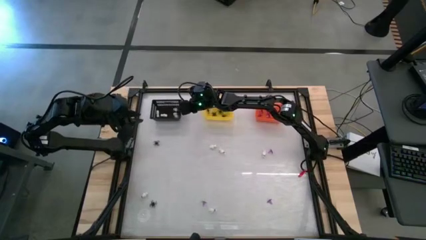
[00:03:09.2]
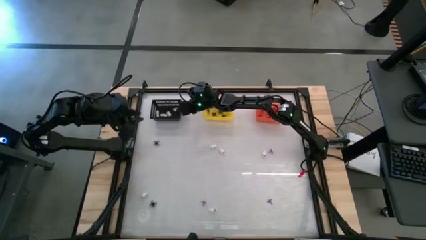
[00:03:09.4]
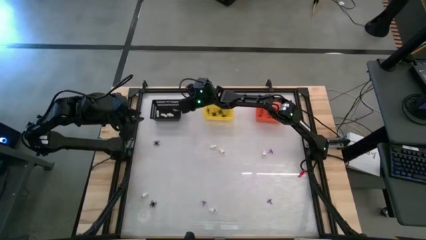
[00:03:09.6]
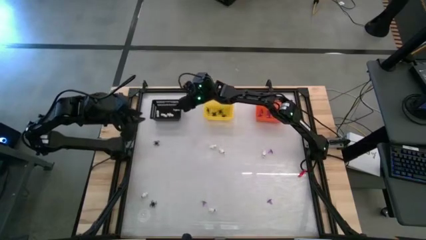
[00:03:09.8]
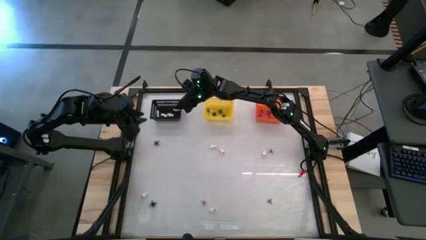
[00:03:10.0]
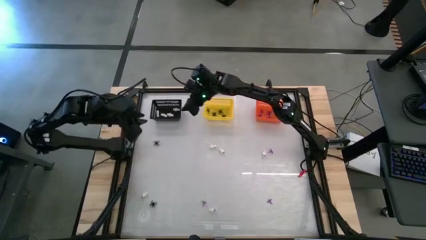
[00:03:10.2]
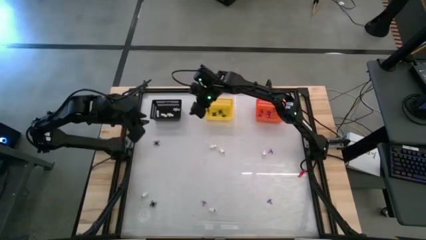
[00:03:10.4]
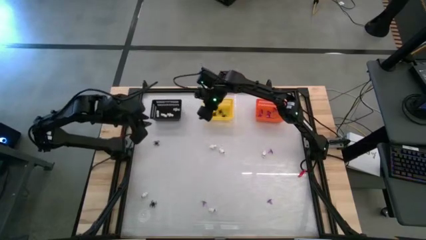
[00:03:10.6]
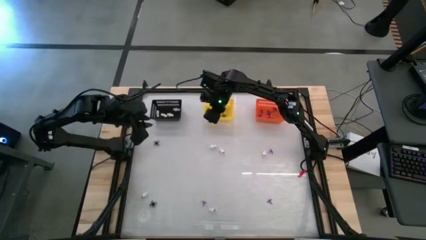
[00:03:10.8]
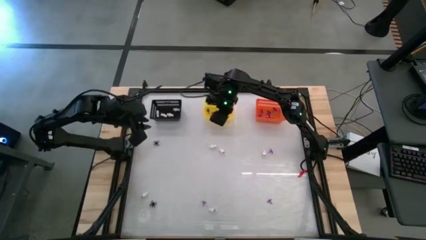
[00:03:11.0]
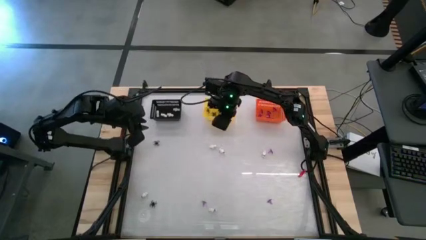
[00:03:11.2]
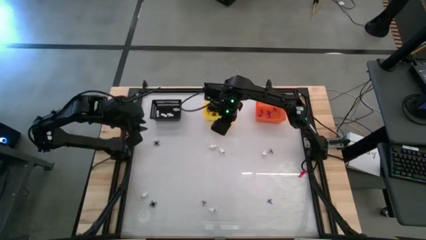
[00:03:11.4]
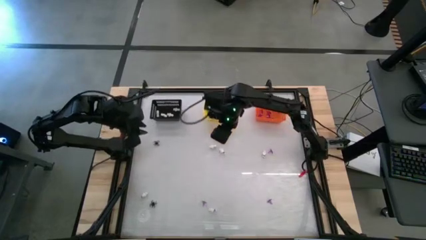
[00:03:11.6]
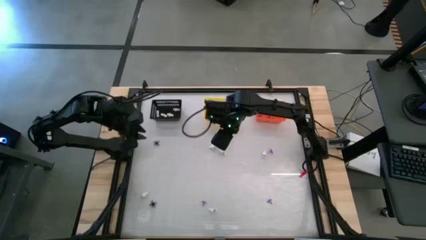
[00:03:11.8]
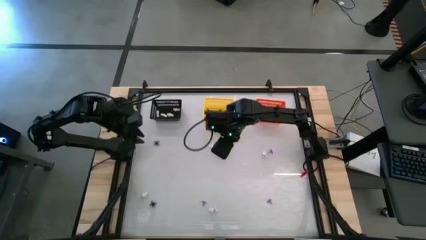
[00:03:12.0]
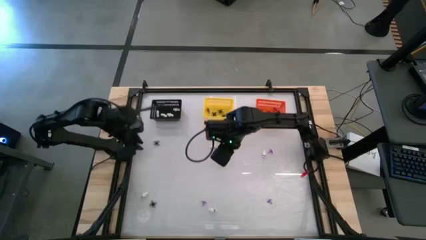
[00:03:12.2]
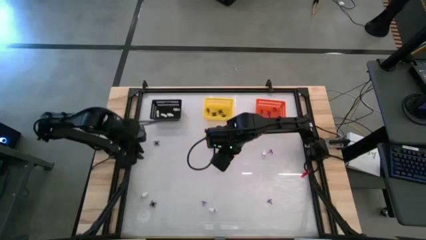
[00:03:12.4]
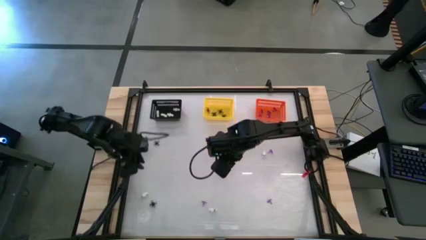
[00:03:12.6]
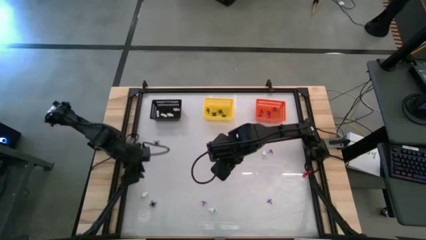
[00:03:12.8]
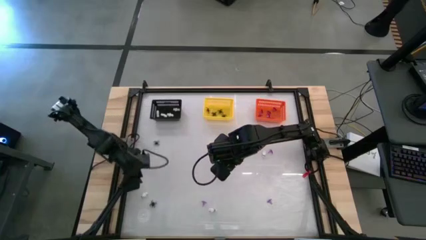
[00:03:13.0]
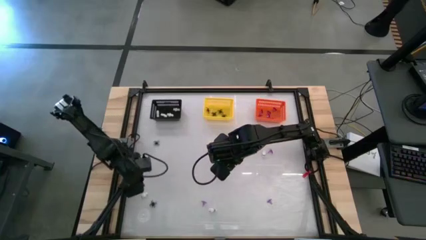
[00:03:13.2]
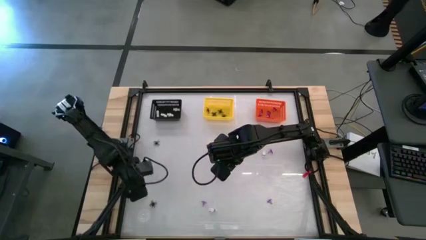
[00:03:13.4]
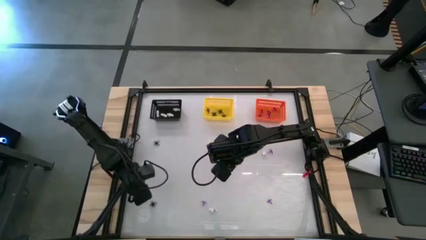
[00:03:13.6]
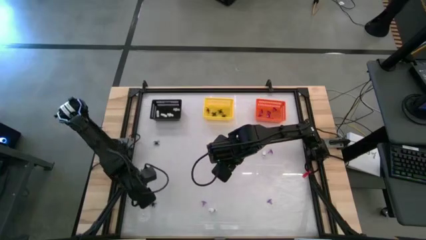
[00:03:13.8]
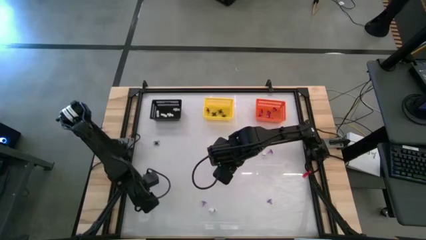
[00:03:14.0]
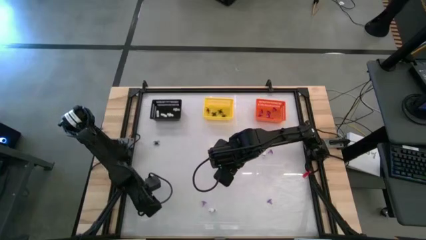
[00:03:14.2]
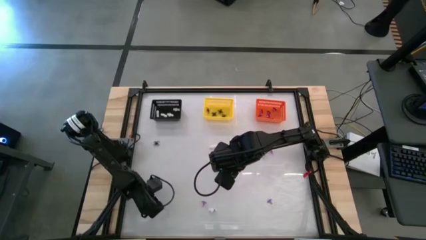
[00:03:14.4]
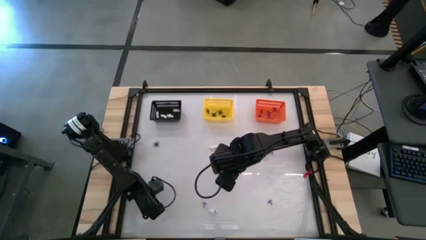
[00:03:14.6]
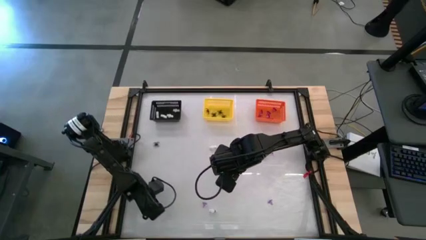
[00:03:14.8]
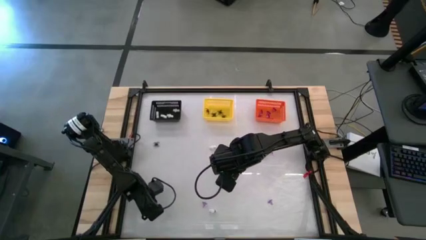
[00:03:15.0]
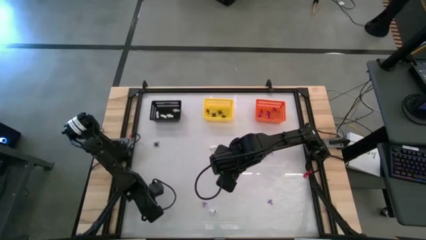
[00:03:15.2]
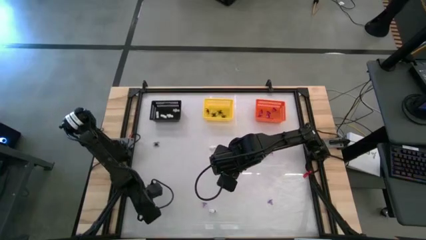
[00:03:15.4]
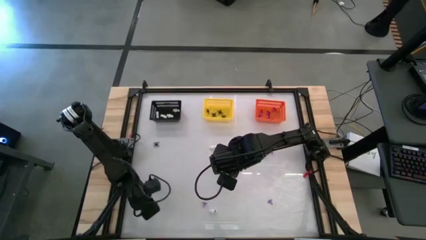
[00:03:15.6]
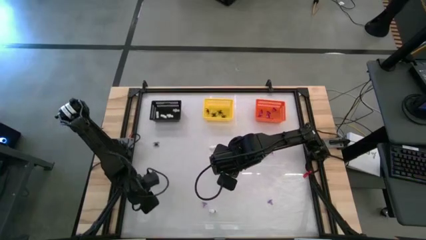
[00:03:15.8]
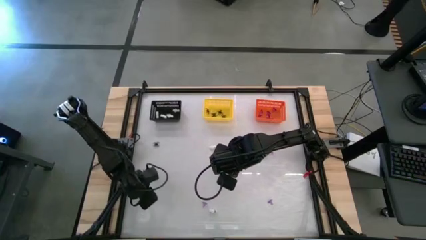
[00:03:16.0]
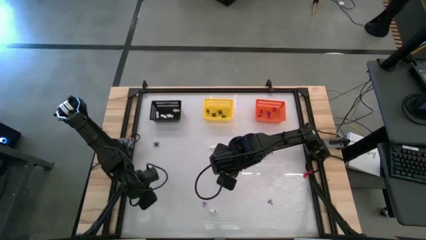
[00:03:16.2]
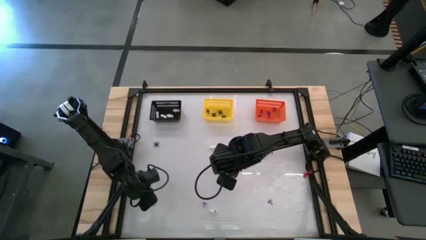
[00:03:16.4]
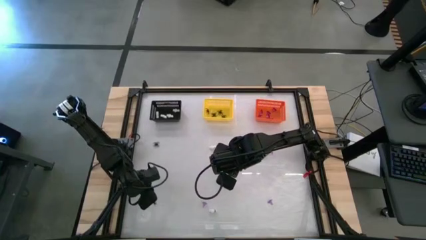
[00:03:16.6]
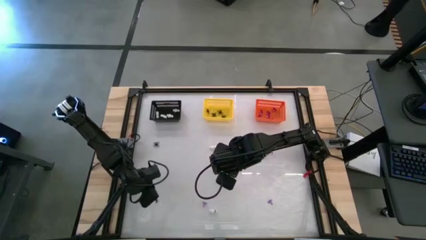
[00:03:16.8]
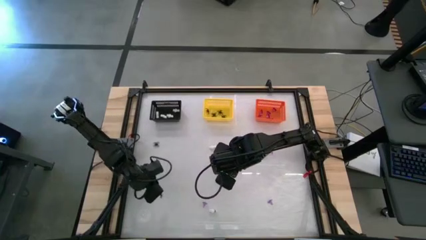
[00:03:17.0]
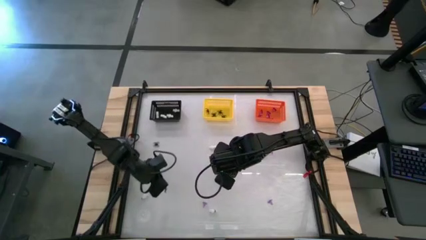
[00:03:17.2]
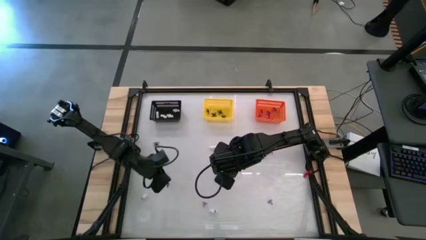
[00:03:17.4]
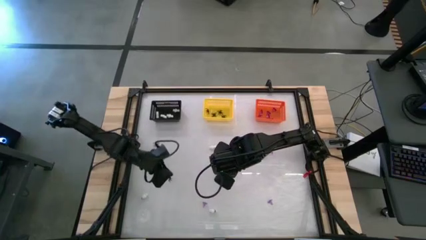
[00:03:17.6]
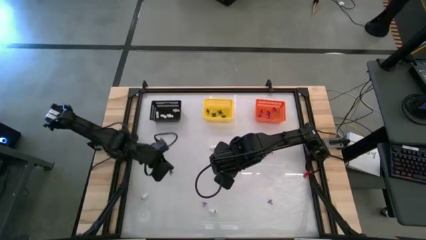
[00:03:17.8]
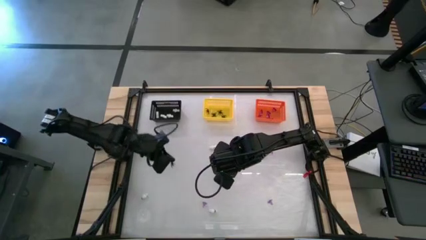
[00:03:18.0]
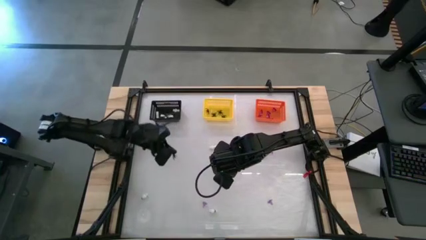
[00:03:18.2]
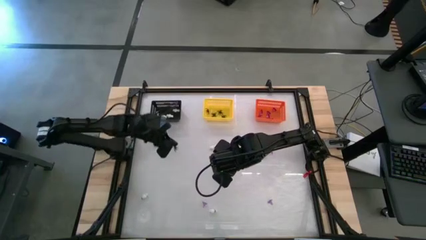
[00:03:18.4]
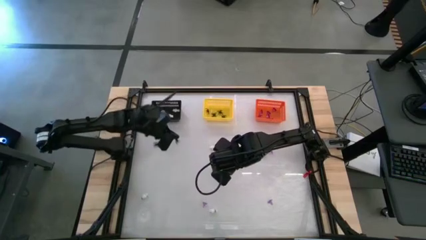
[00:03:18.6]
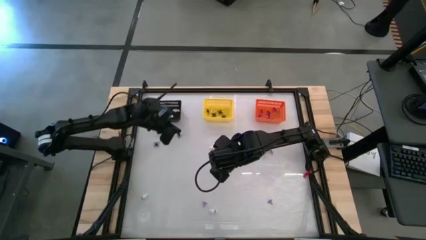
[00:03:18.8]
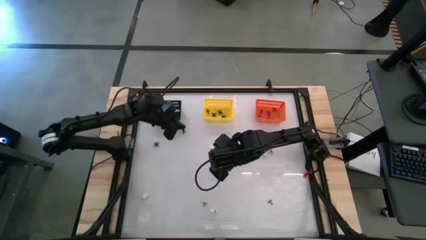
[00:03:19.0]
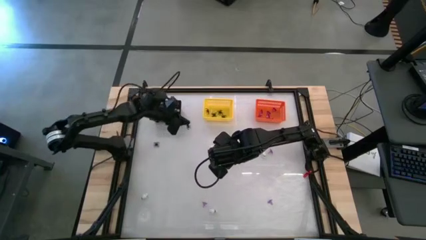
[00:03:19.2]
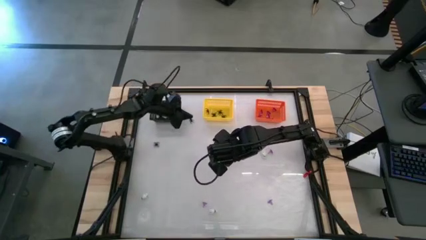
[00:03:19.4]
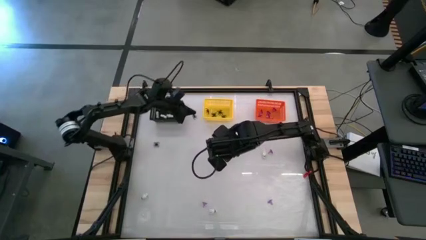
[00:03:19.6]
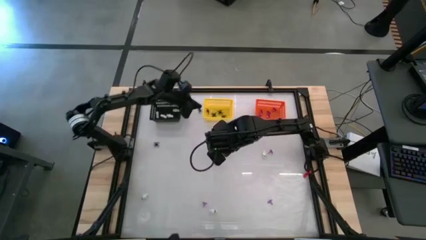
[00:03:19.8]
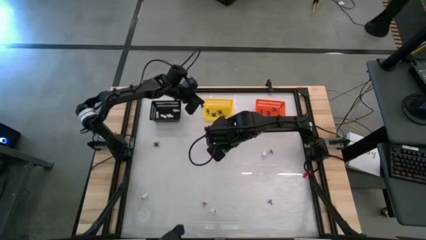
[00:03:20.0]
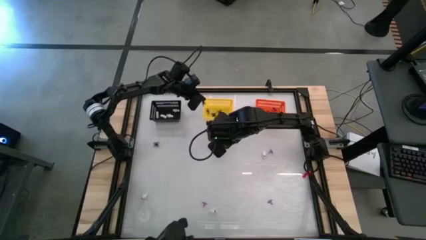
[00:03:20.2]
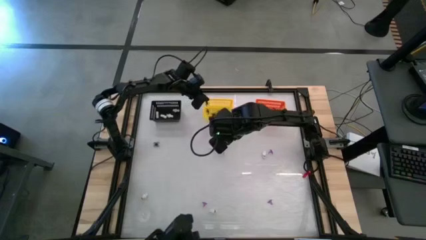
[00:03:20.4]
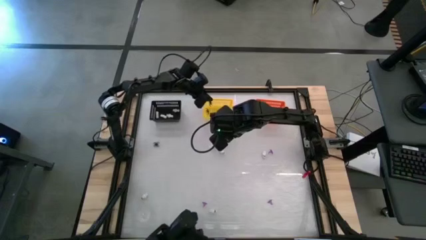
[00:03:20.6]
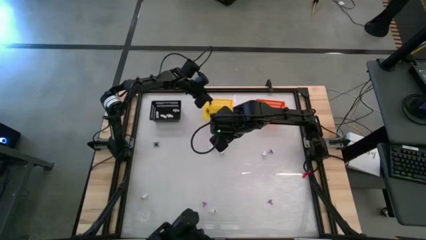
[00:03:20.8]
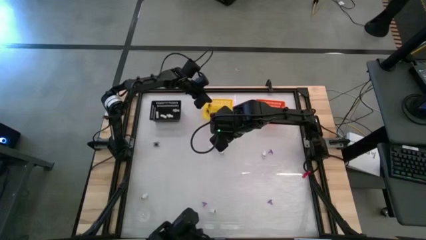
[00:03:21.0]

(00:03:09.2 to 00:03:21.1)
Task: Sort Halloween decoration
Put the black spider toy into the yellow basket
